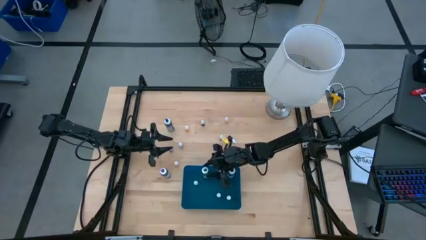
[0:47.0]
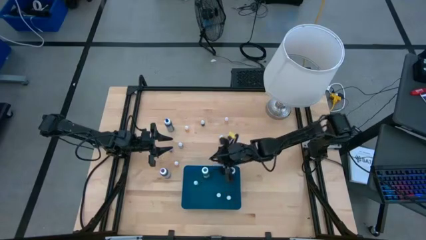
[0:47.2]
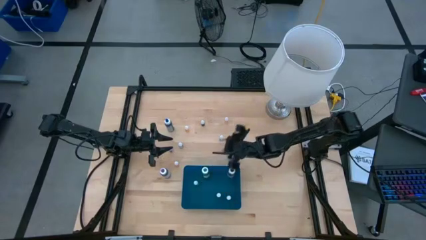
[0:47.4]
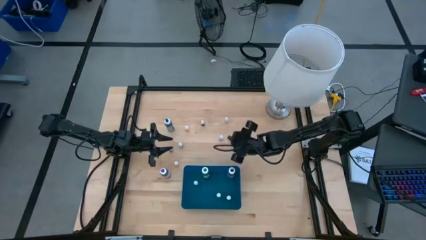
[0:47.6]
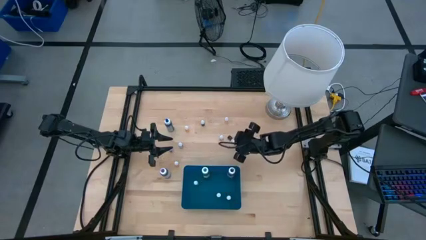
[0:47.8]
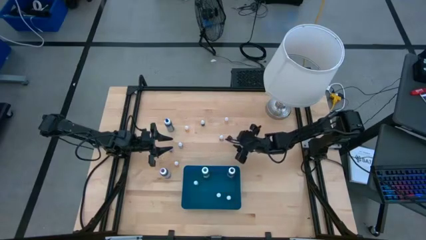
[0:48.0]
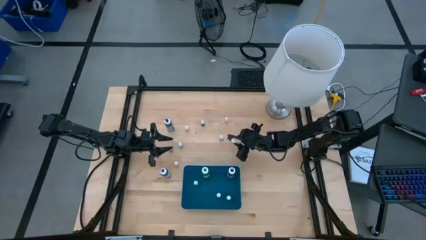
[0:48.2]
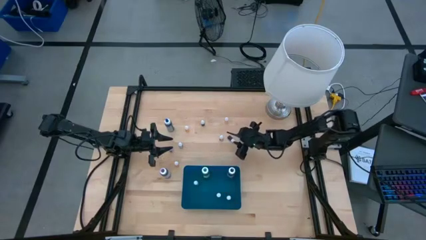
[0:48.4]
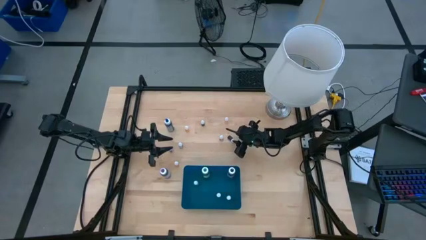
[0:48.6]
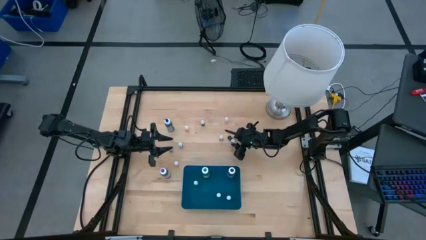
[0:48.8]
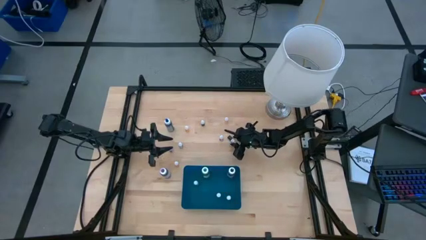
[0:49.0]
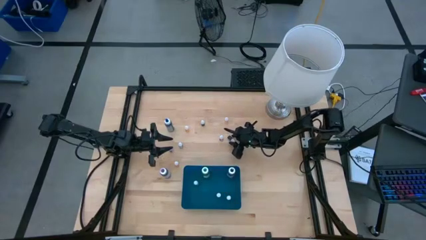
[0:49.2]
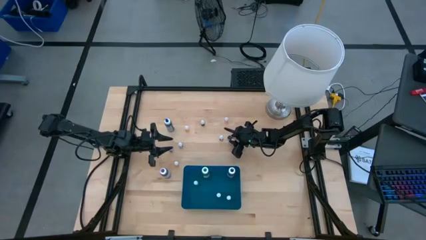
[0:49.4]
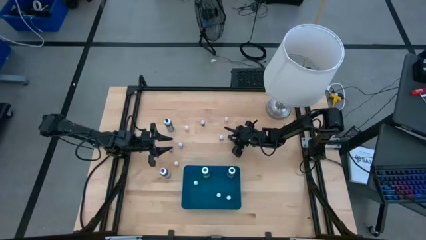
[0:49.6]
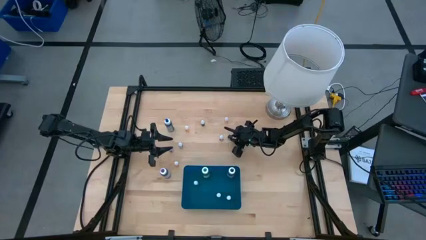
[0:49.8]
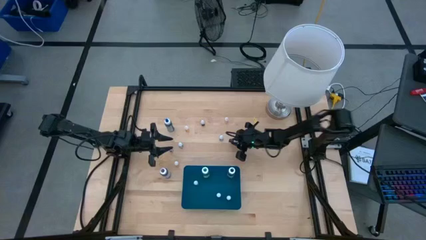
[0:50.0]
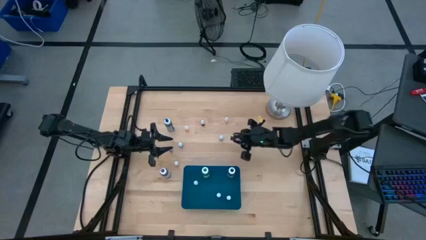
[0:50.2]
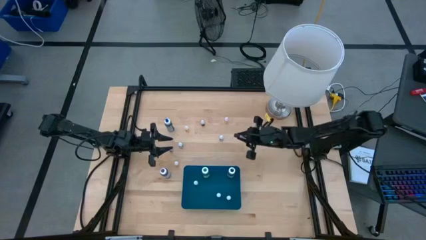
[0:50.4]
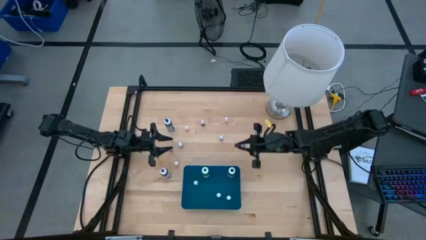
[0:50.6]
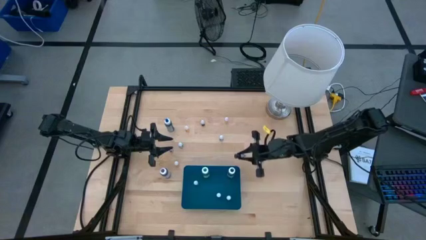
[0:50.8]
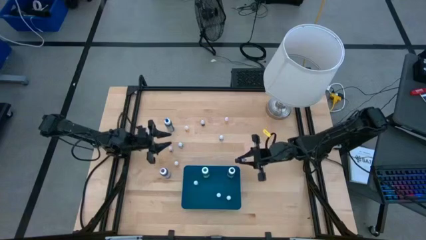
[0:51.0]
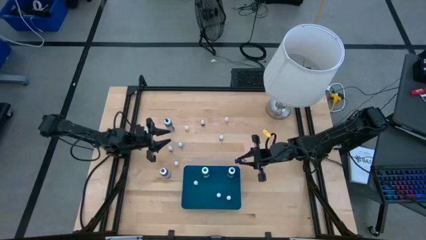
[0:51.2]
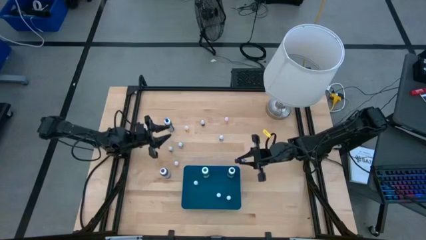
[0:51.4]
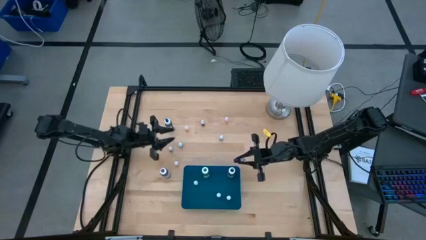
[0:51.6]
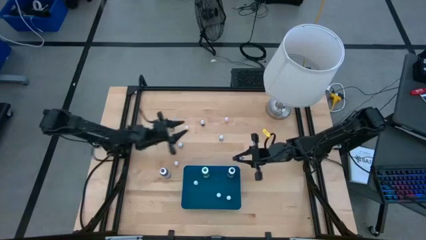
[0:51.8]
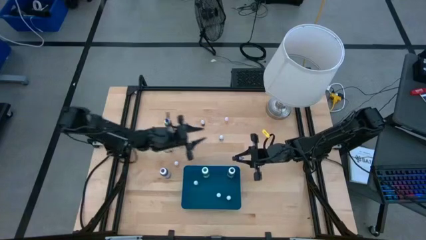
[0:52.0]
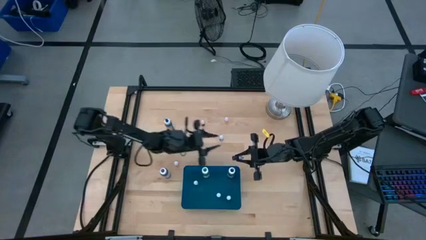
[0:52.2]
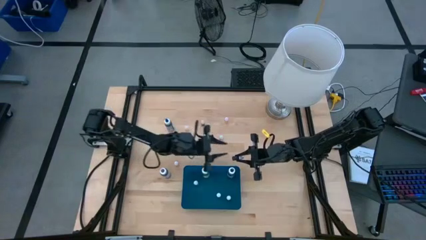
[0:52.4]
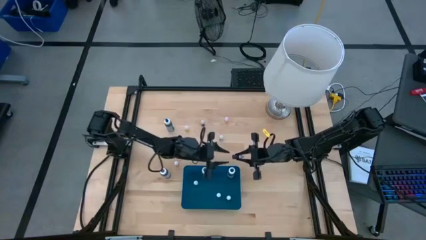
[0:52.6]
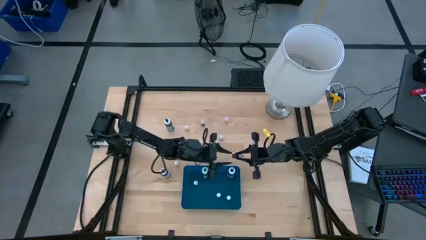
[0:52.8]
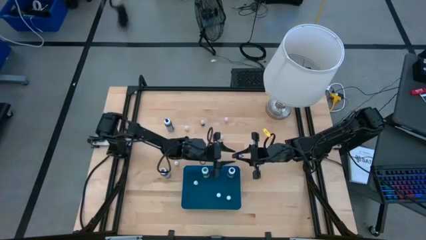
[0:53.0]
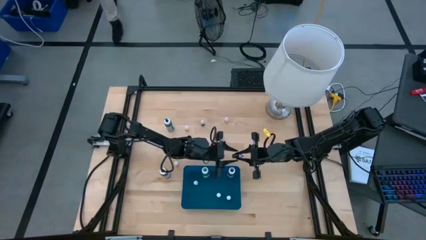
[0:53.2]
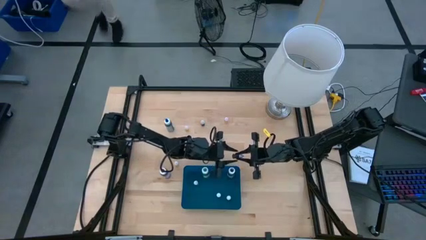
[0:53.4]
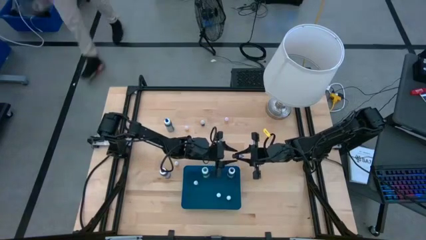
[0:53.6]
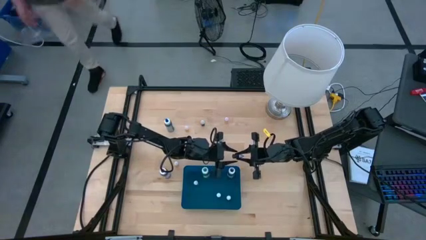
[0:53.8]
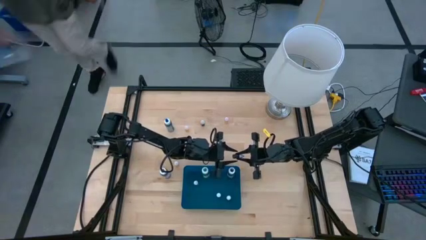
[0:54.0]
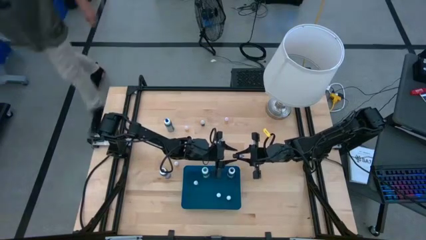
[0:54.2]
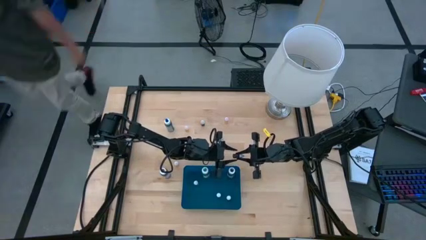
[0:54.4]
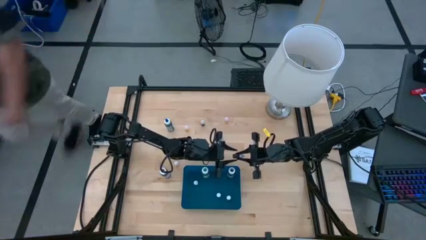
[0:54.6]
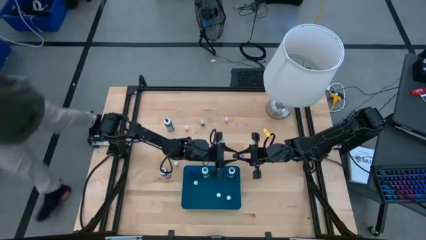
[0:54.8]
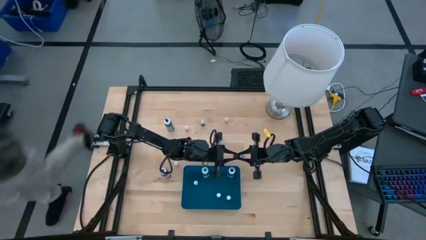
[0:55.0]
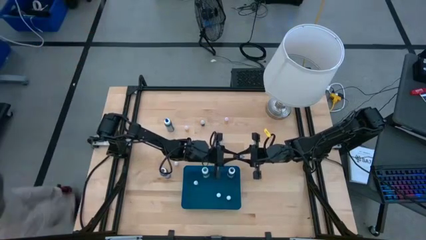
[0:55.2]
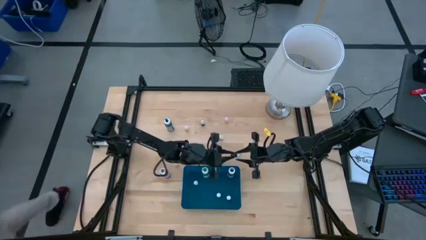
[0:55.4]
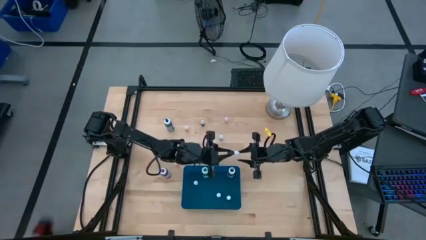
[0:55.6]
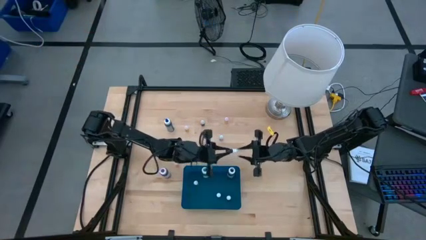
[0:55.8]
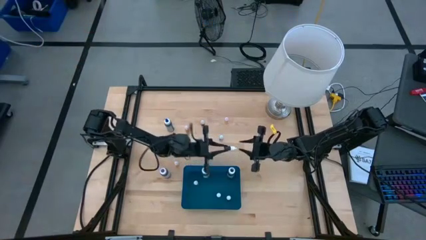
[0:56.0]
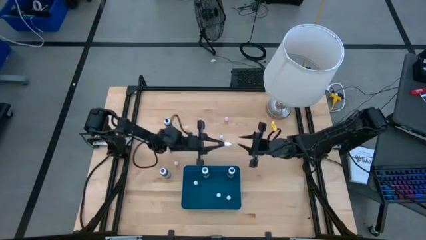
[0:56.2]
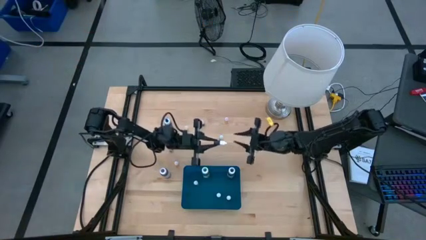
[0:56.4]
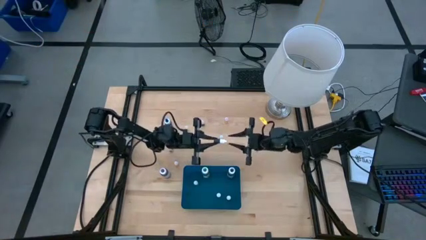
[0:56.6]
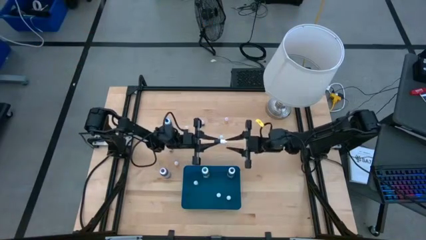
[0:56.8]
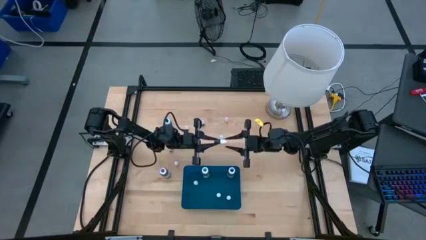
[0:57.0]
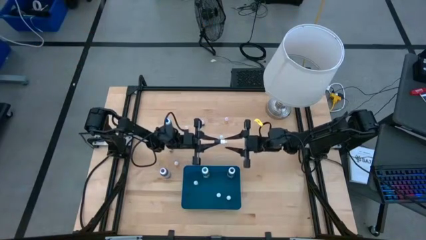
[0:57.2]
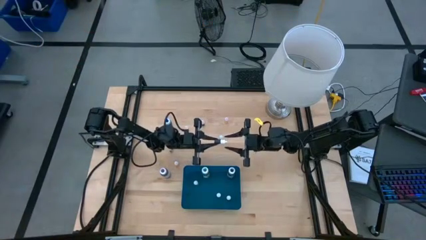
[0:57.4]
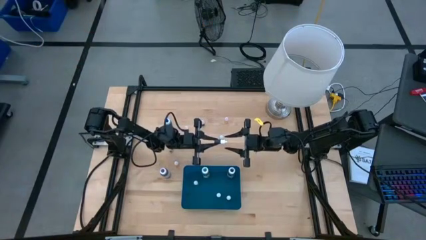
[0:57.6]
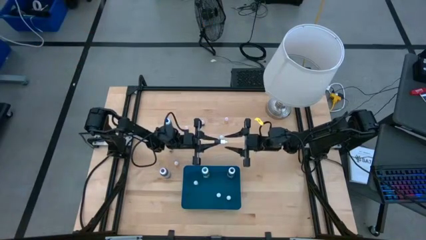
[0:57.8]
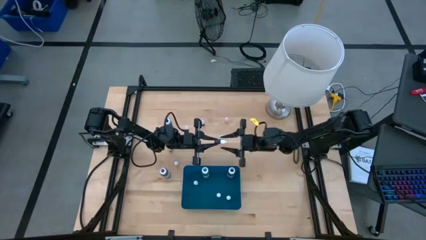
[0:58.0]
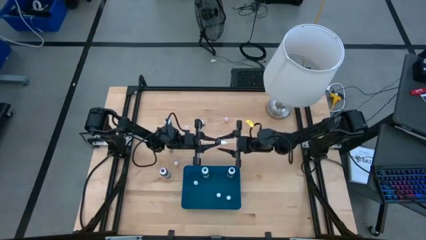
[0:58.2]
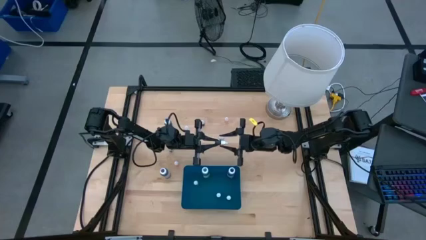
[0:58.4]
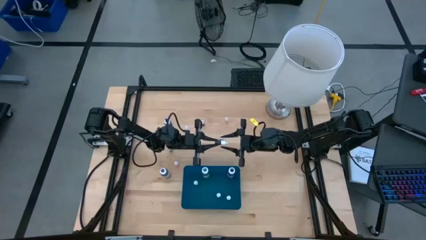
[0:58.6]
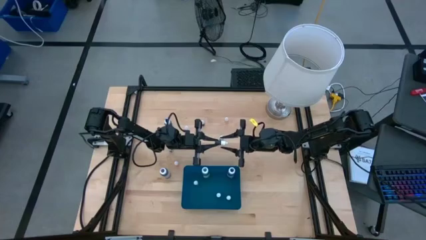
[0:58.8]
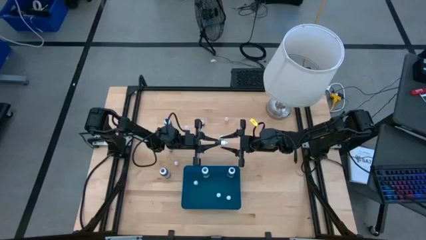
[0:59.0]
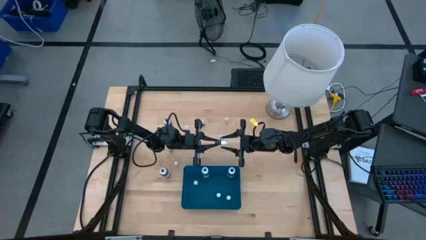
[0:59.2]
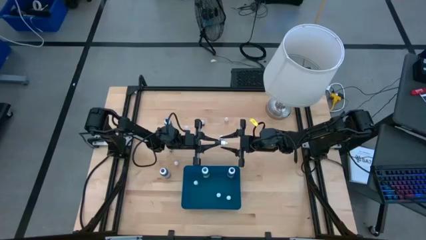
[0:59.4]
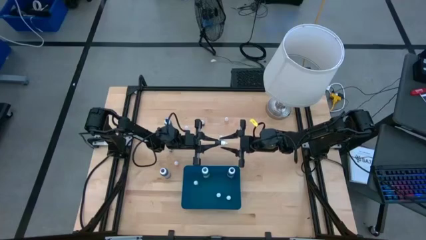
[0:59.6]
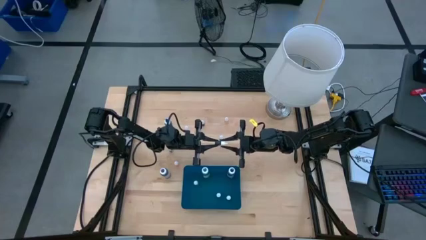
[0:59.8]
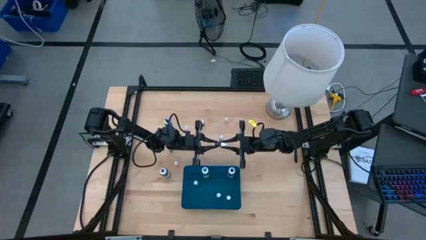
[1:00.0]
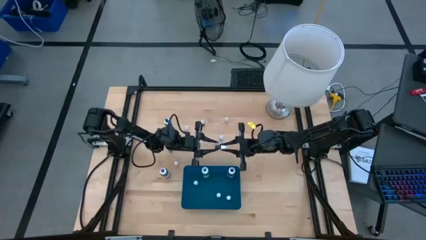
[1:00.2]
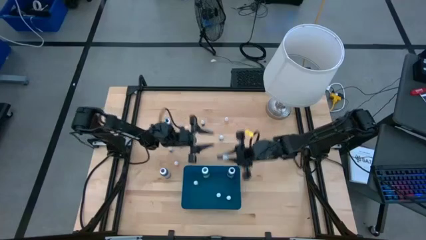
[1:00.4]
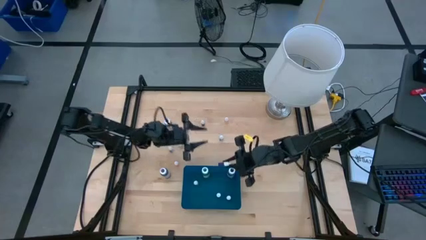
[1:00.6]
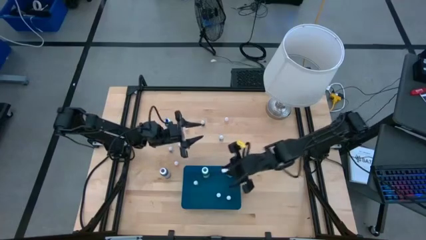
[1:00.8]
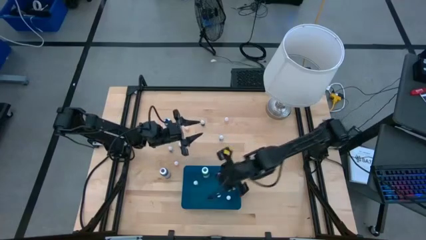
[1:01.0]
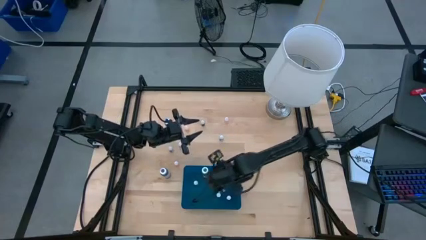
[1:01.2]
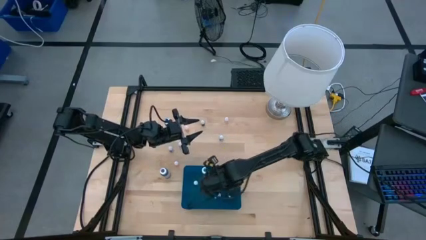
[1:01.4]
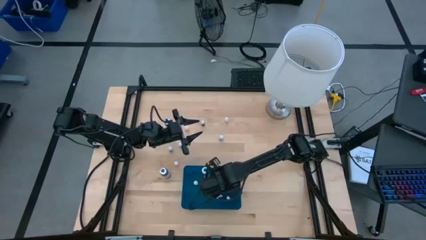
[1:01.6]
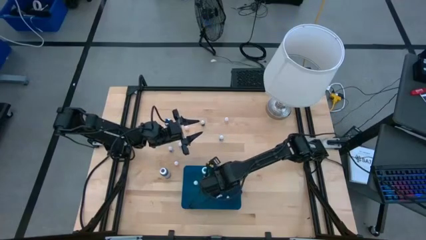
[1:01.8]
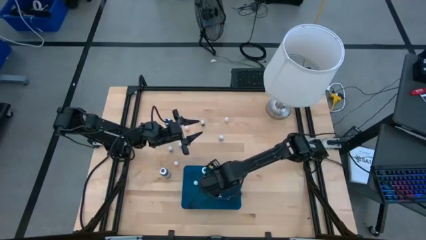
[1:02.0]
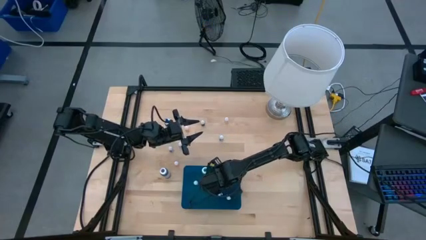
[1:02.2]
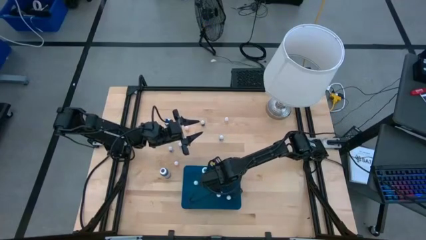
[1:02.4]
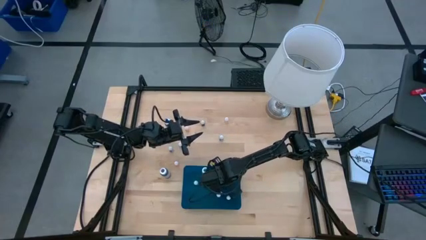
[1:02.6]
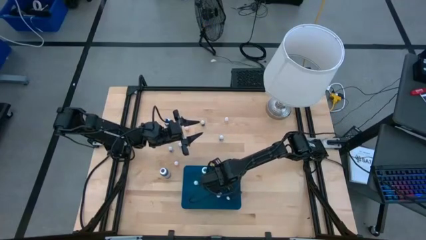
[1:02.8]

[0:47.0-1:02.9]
Task: Pick & Place food coloring
Put the red food coloring bottle into the blue container
